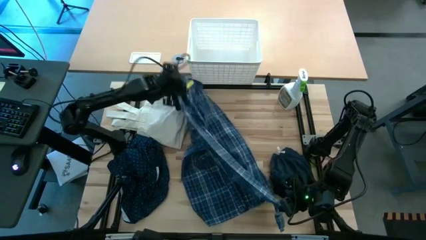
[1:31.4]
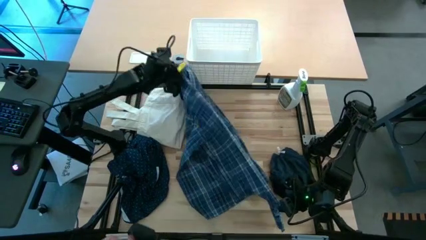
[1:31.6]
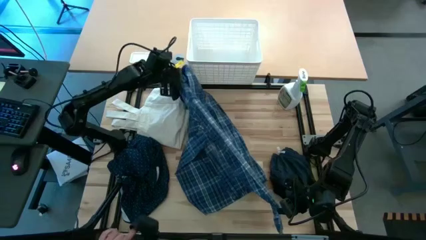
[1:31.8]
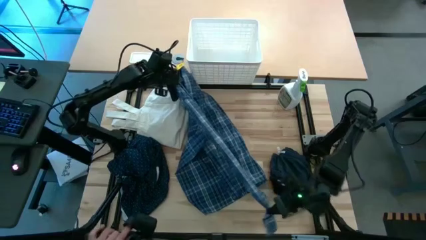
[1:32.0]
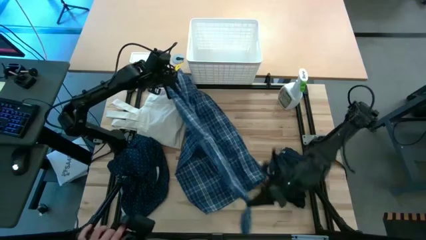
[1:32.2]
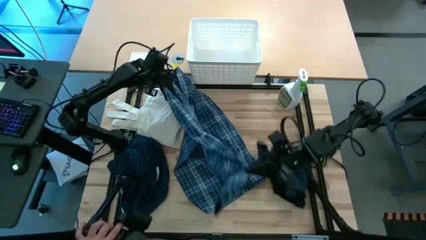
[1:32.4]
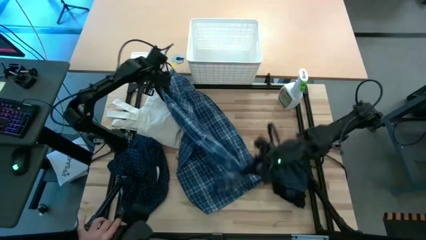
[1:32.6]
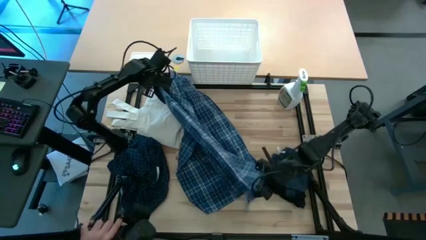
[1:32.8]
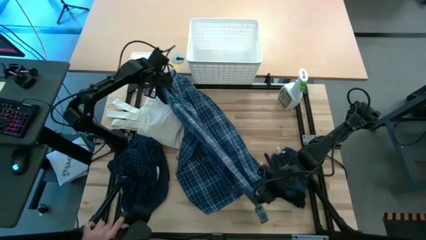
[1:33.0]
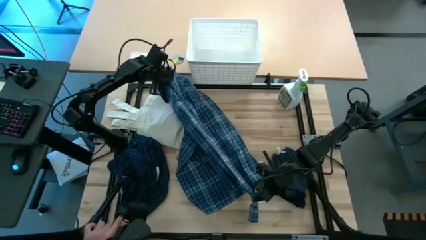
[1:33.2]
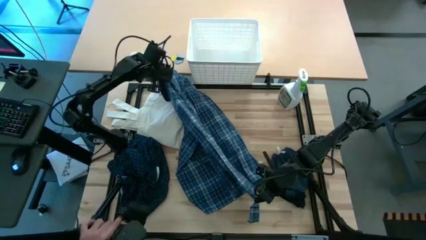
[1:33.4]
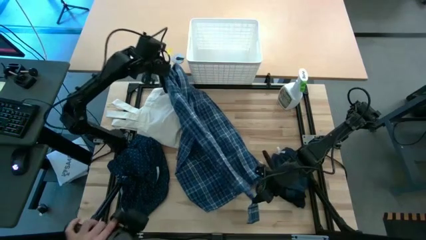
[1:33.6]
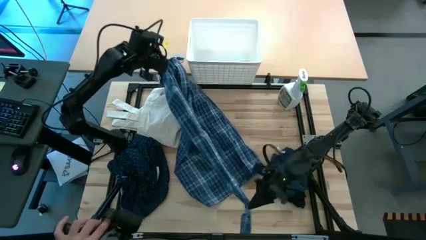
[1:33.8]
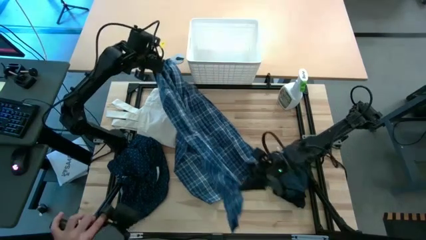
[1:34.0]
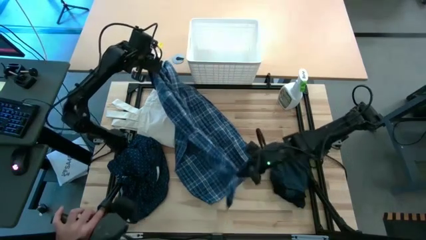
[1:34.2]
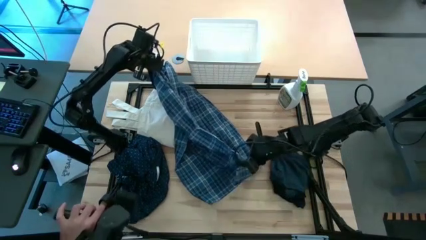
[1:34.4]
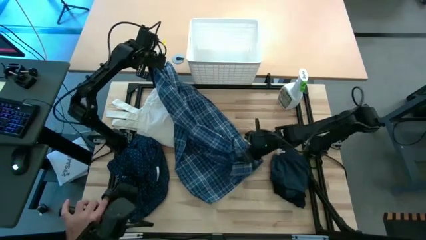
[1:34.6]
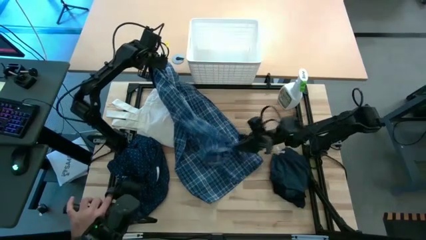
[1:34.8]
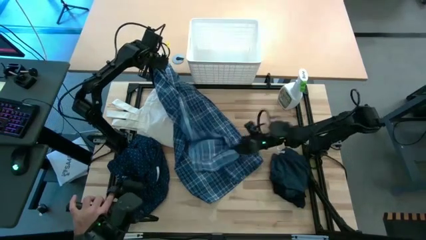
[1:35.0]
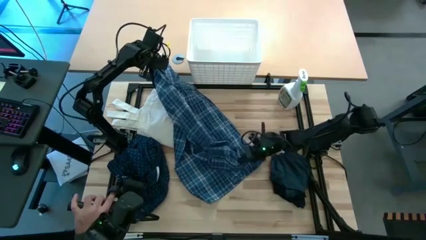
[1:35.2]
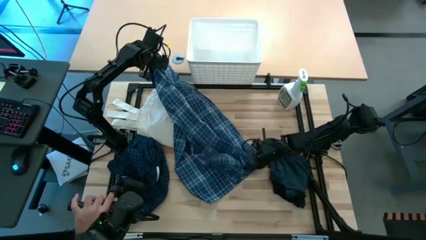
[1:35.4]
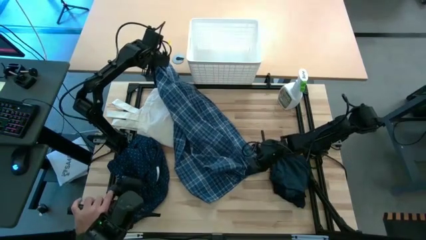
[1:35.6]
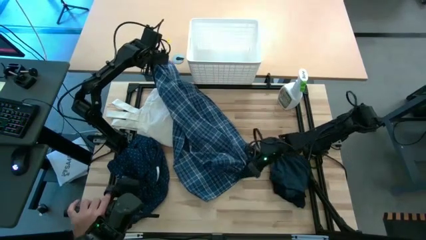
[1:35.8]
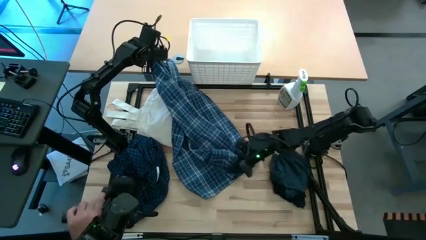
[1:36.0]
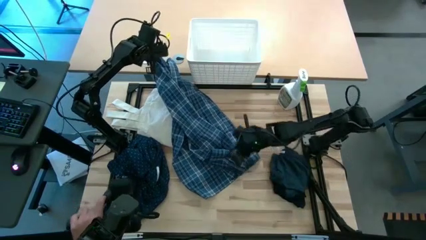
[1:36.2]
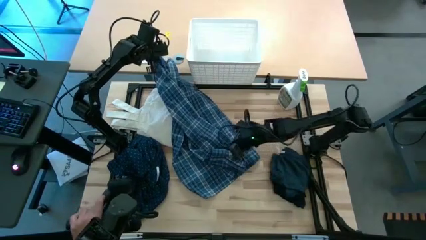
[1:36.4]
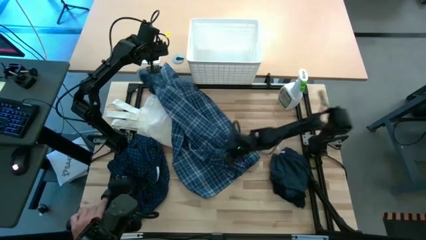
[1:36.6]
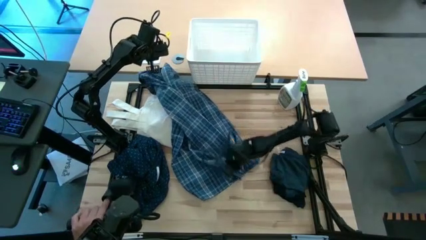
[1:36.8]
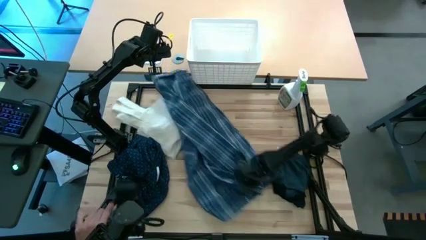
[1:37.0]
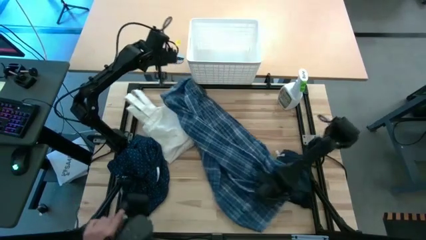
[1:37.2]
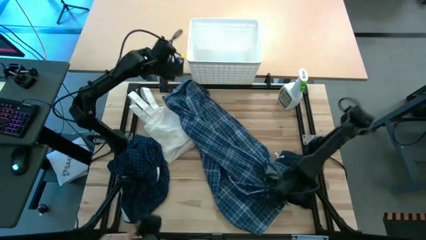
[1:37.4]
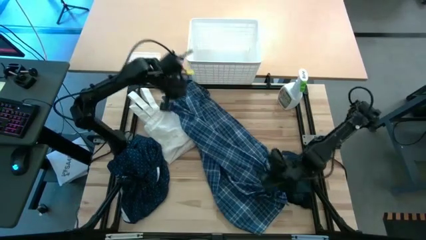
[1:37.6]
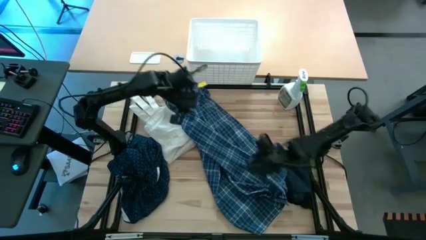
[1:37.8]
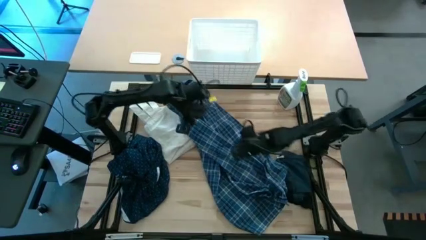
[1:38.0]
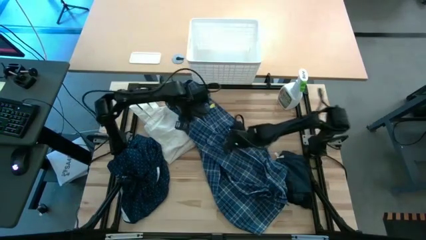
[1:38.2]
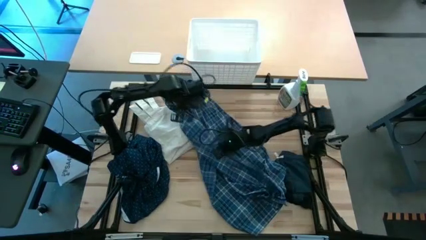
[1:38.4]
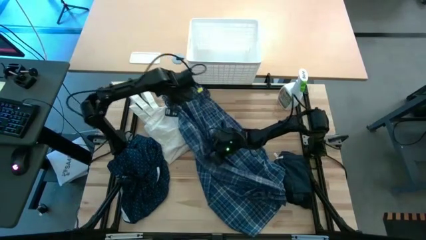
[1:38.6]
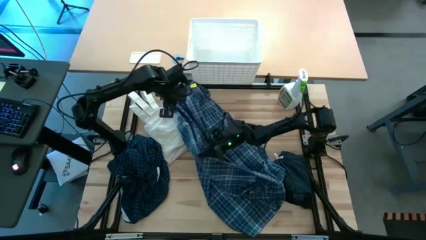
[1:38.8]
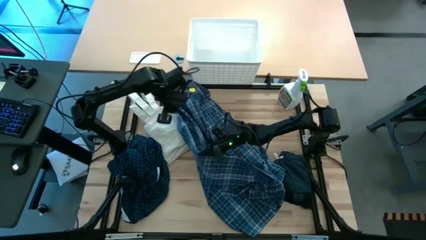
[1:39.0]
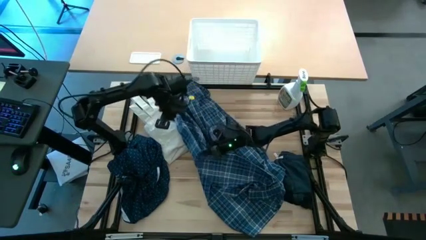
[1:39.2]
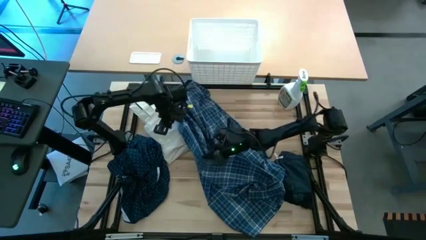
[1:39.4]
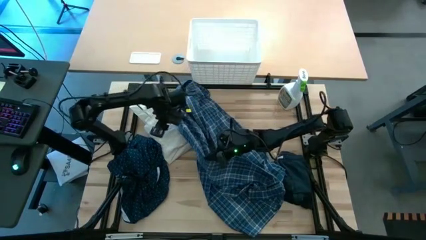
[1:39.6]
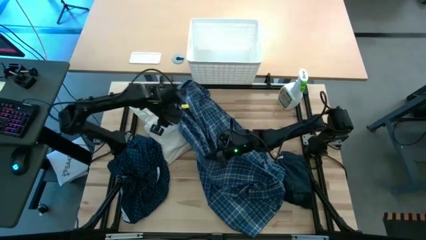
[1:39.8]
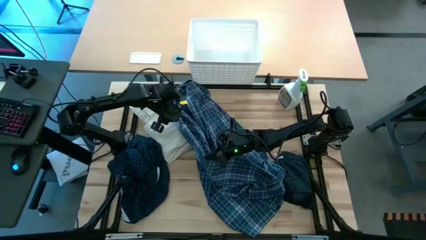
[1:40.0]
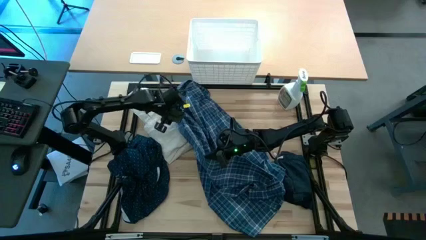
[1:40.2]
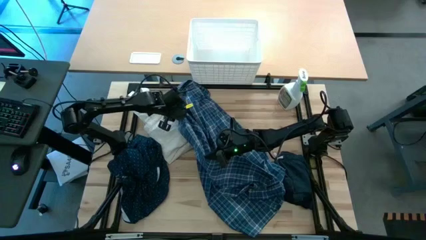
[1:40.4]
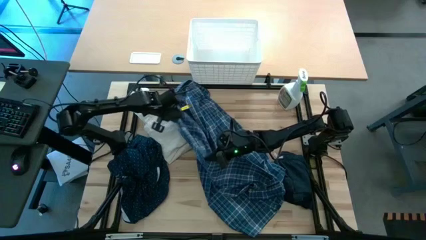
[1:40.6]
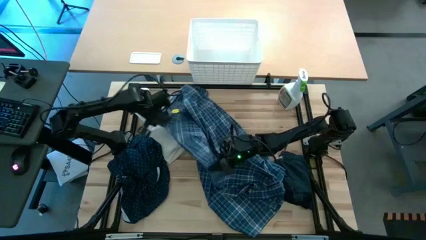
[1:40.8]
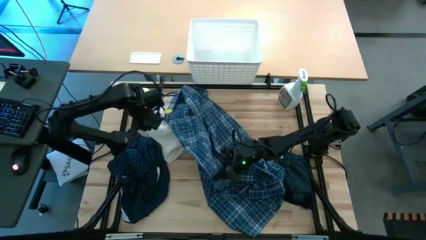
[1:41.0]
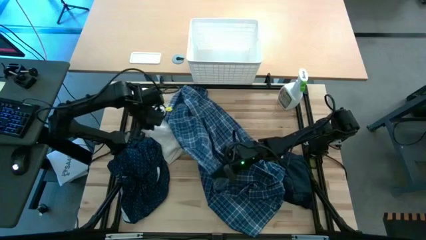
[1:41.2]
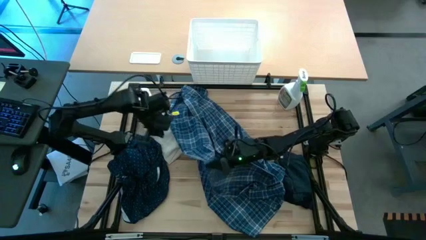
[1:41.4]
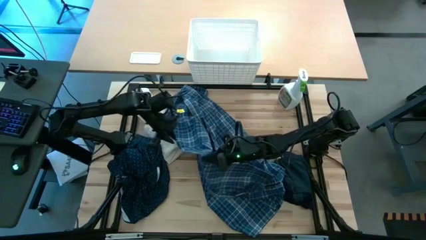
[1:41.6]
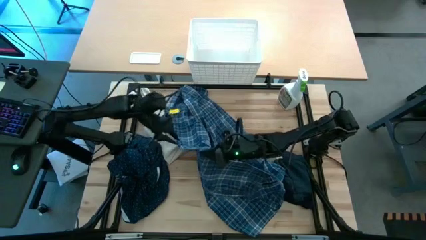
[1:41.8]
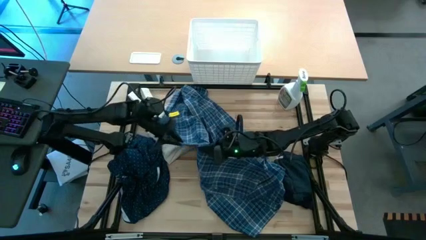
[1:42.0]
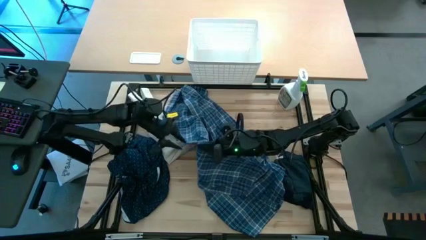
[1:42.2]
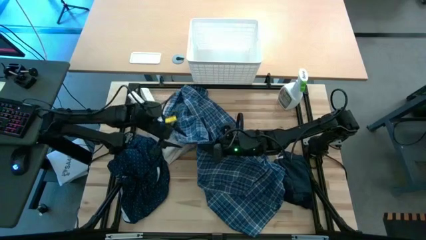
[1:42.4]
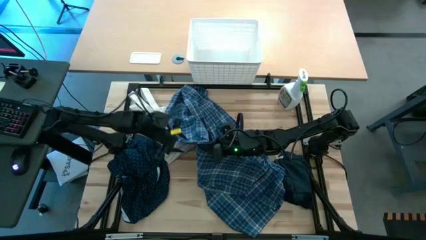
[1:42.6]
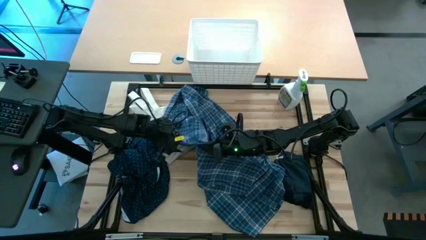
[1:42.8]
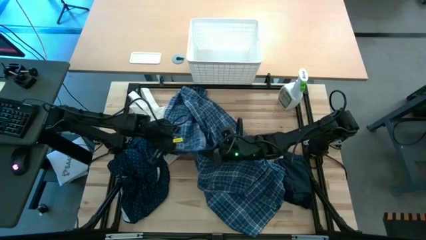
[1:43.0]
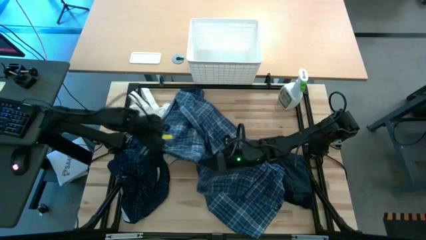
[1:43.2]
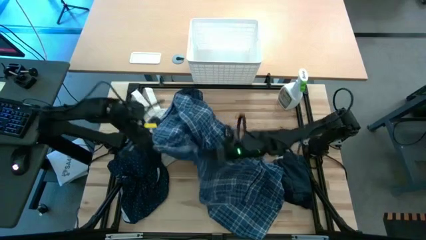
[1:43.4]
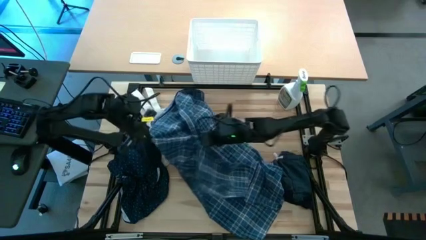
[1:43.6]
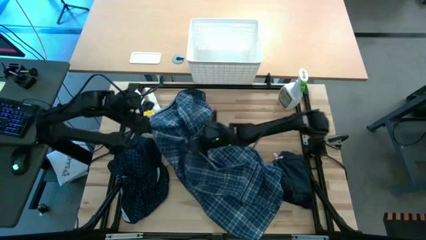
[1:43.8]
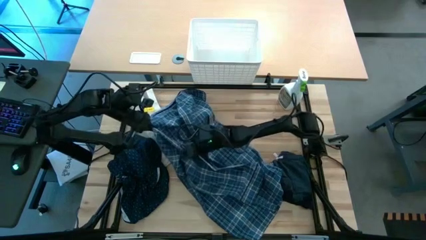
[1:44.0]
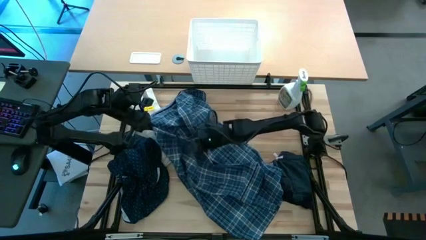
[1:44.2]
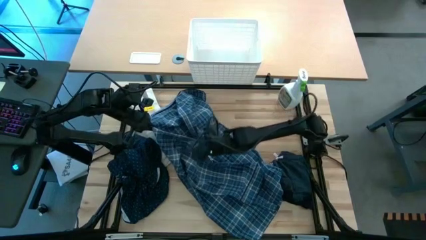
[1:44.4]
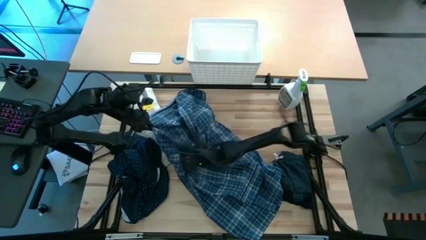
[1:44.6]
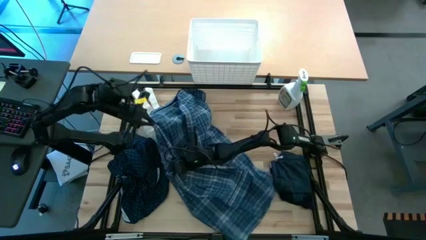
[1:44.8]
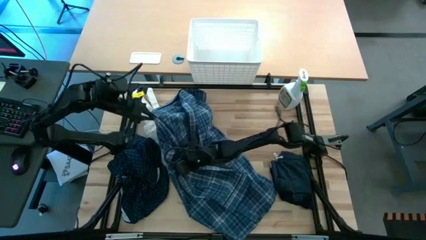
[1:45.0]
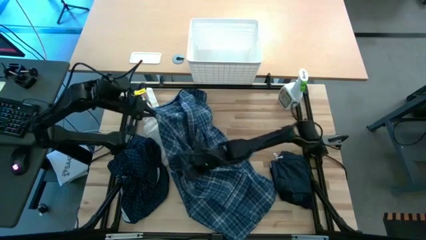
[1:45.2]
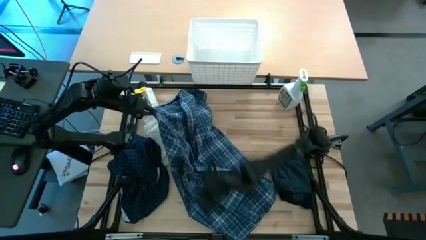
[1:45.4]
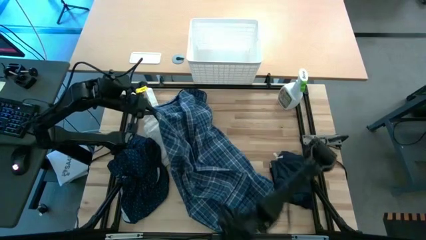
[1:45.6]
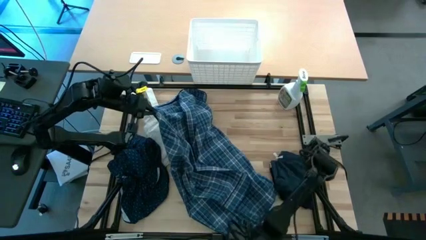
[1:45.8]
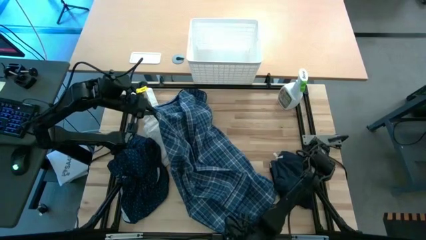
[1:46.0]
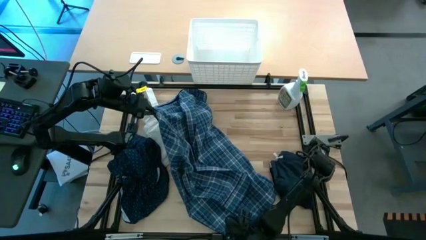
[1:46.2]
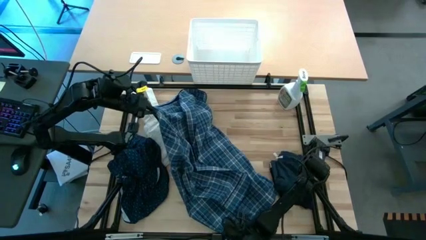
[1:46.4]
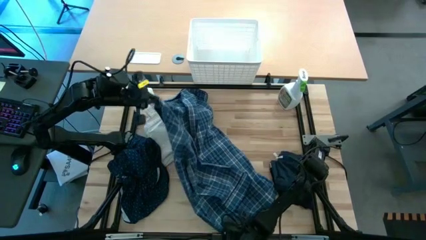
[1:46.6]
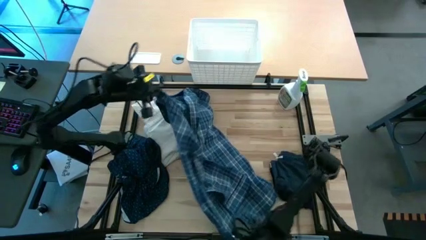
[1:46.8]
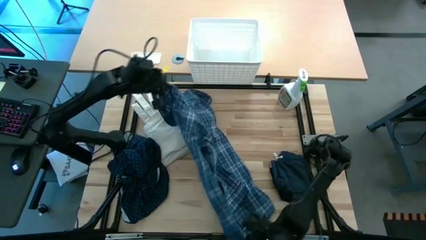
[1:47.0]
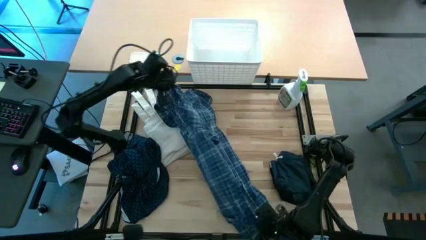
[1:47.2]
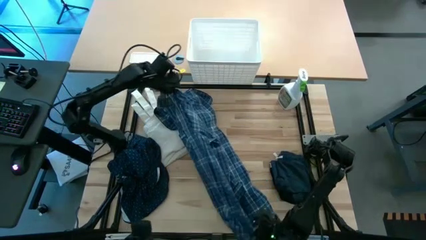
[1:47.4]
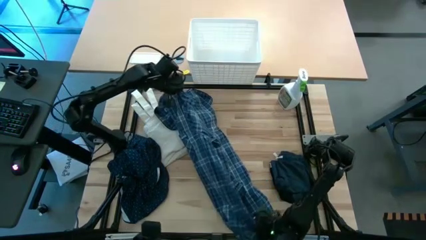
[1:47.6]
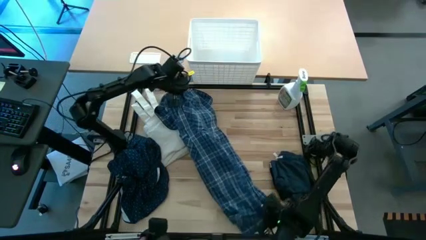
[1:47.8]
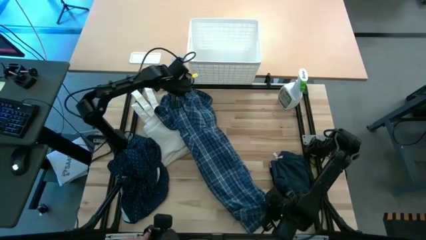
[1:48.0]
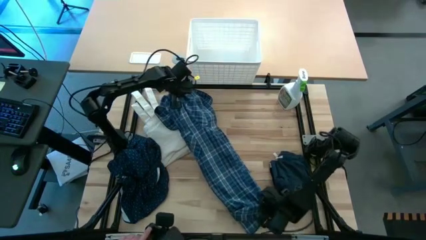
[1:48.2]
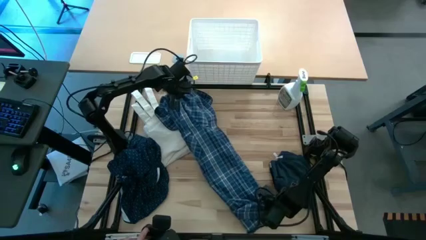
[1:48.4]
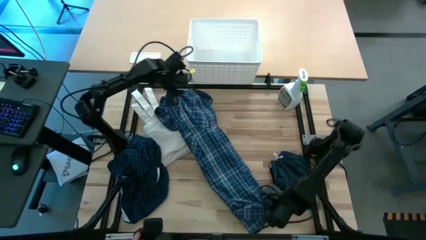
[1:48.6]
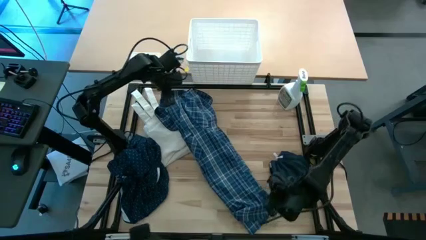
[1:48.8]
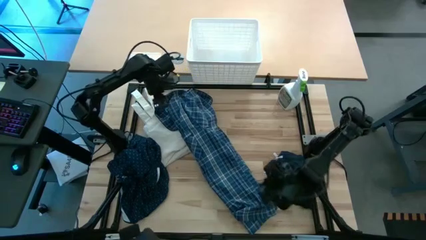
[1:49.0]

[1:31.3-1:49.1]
Fold the blue checkered long sleeve
